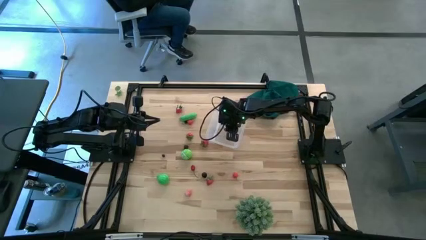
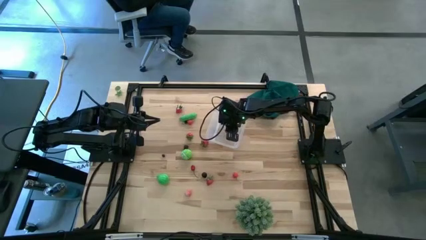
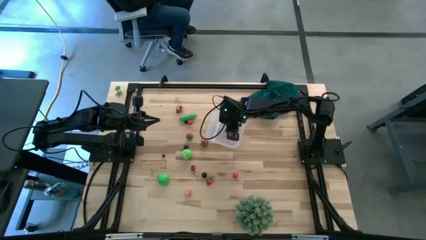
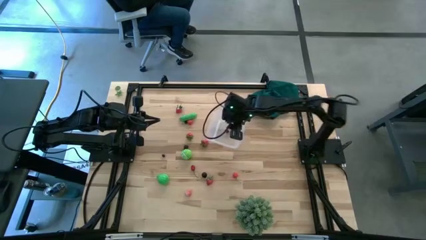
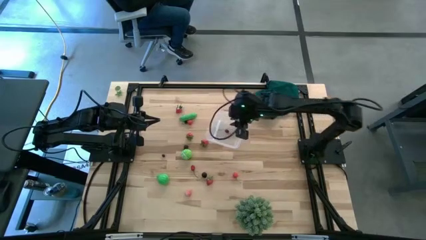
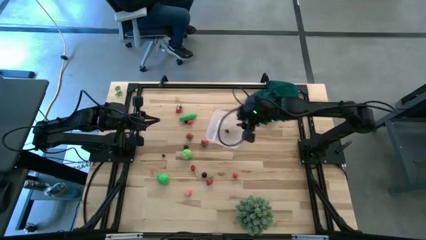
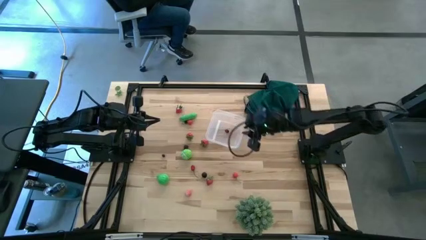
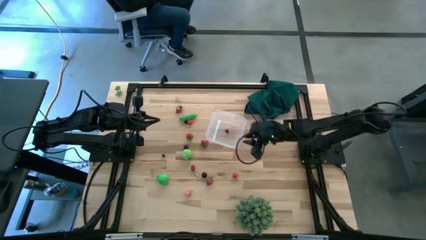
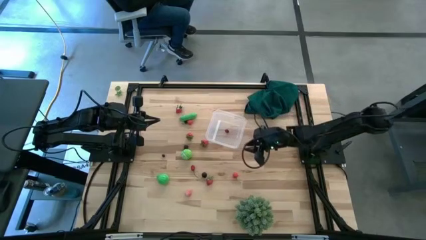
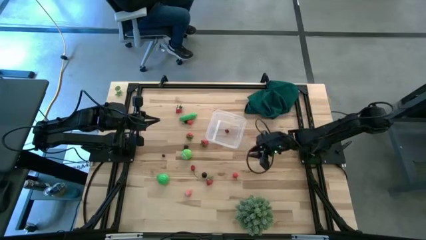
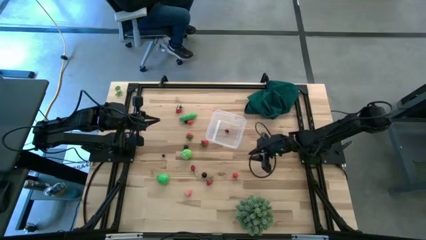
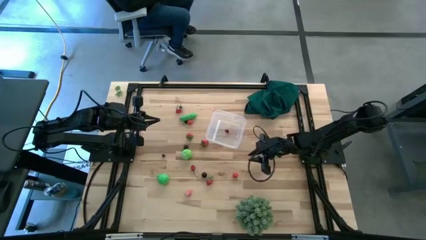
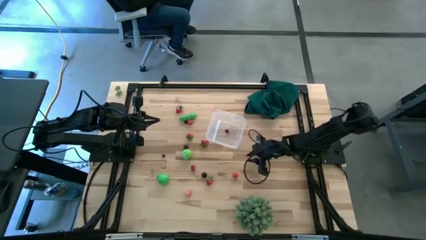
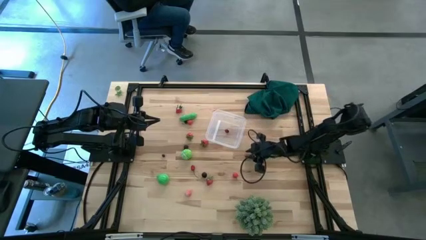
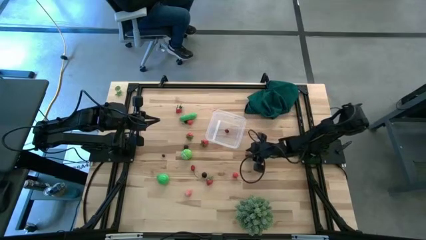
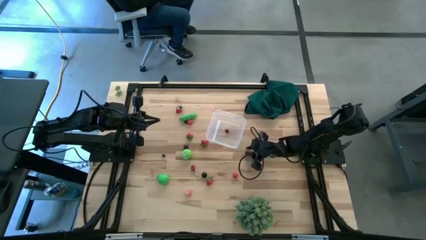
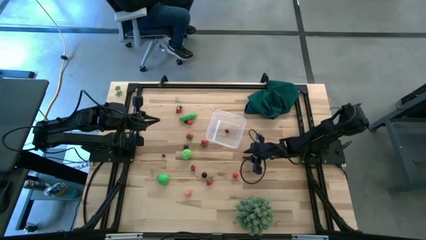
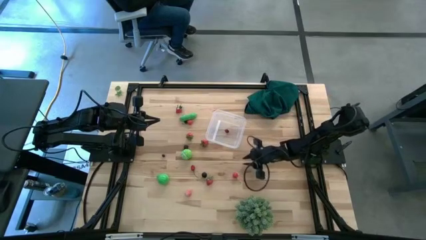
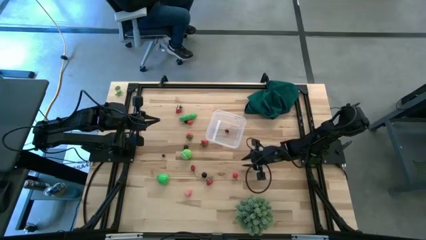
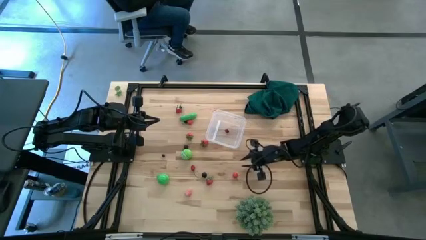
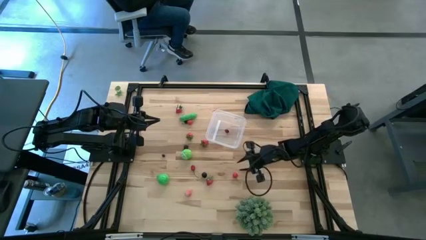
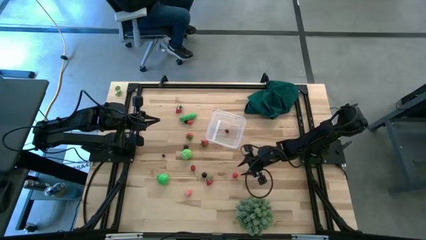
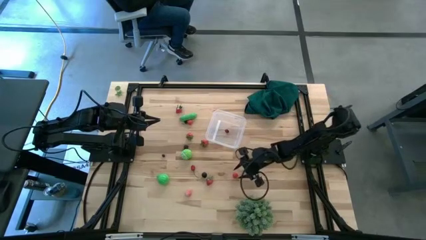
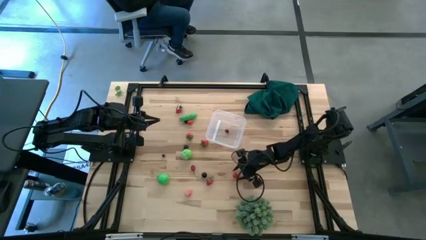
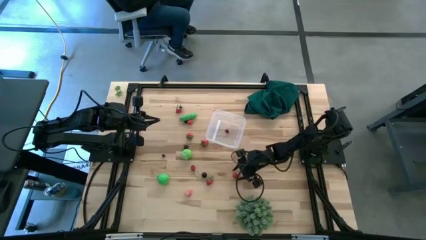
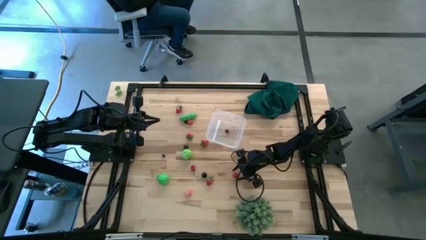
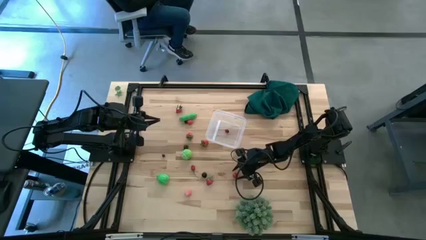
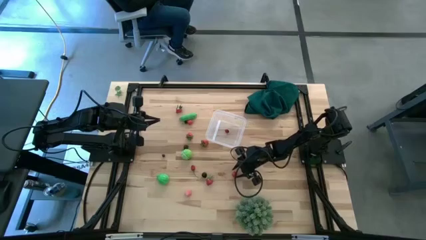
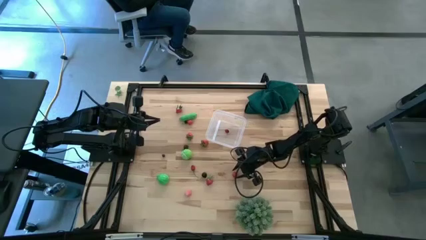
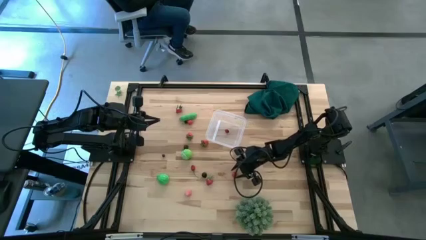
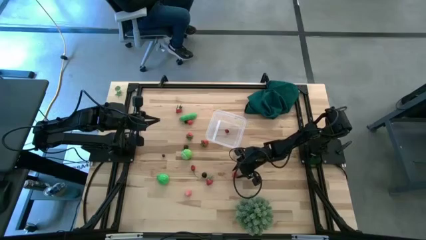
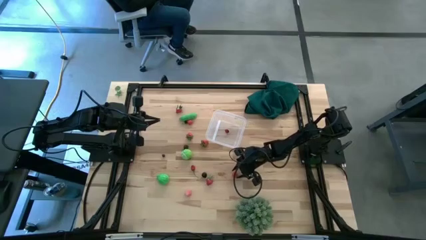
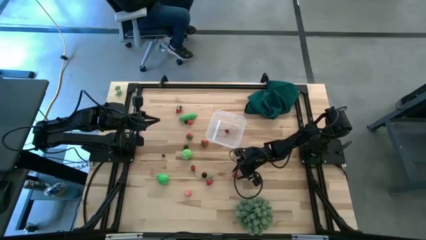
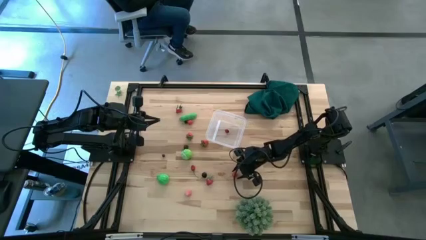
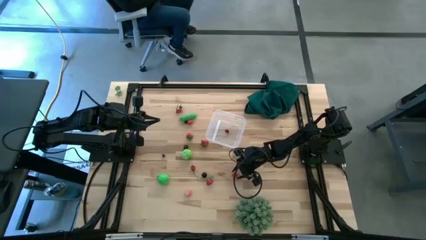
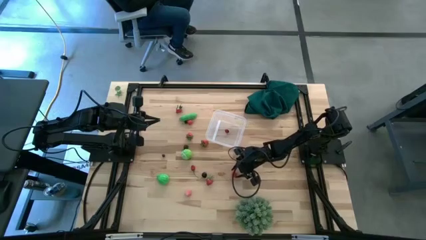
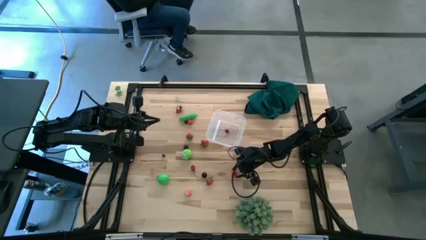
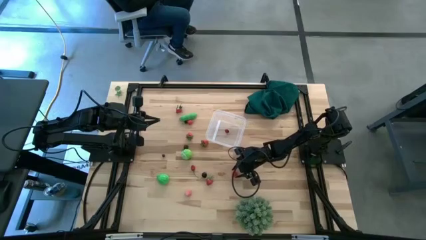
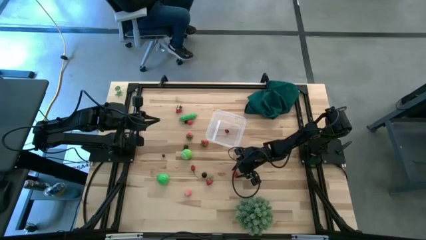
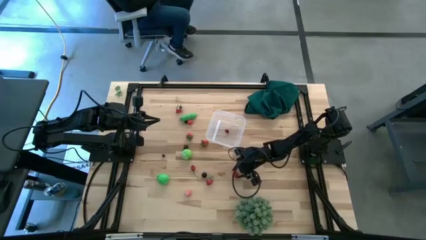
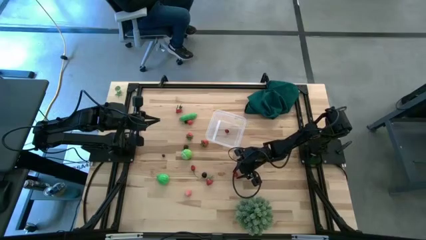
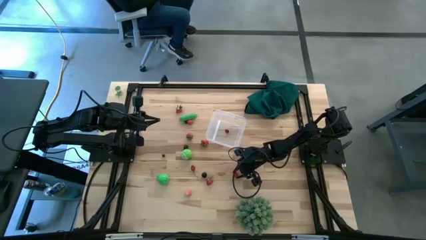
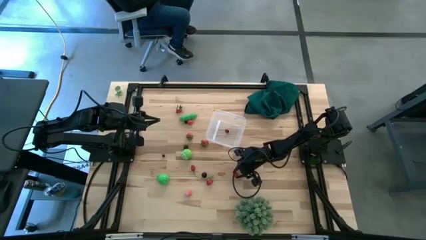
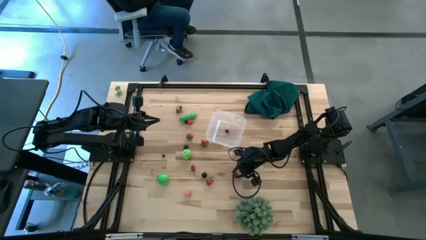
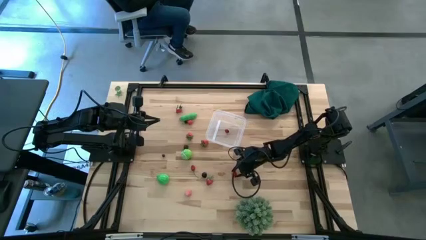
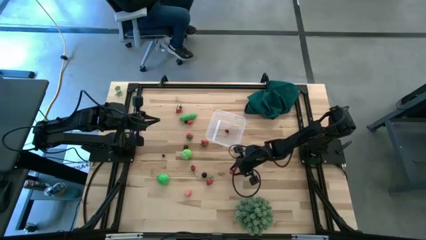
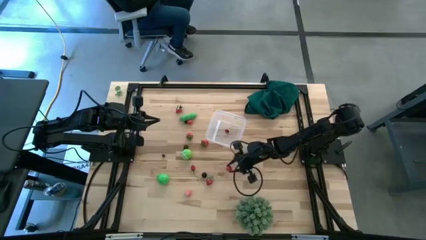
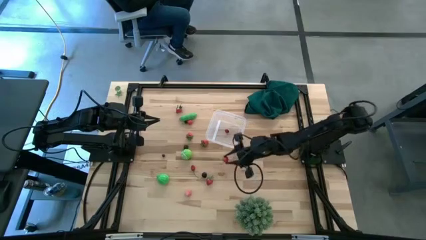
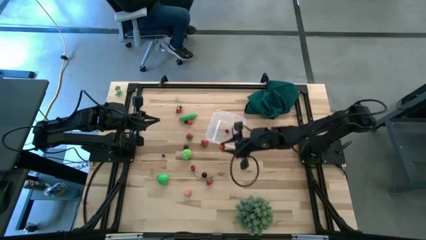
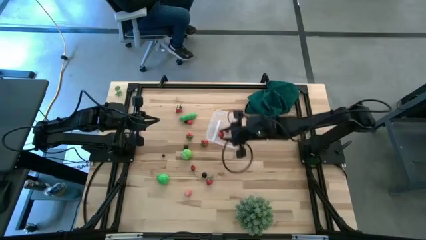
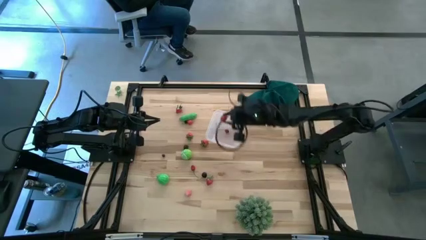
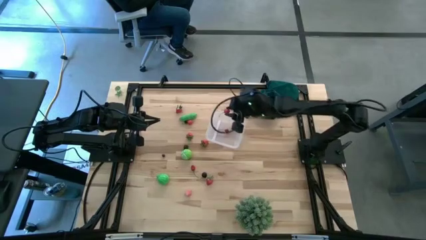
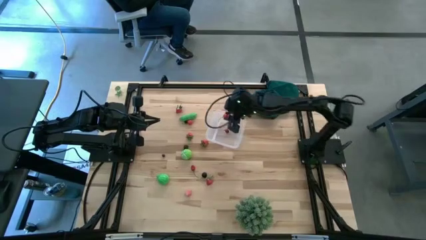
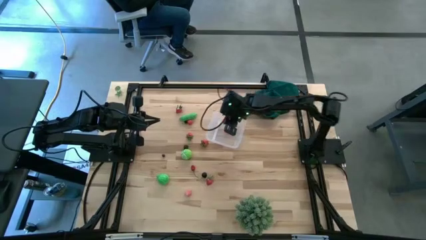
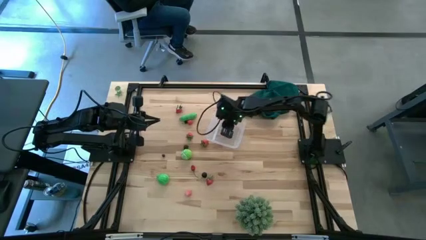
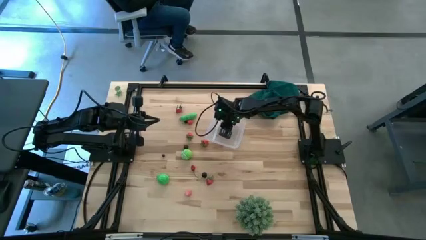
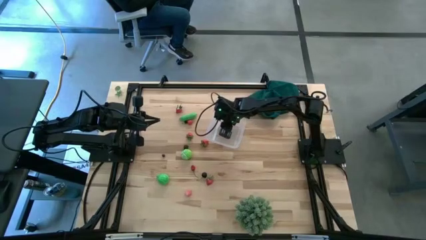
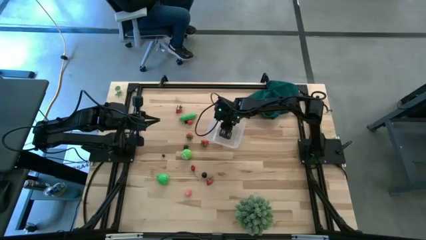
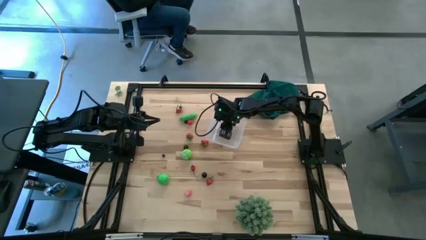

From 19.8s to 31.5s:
Task: Pick and placing Produce into tupperware
Put the red cherry into the transparent bin

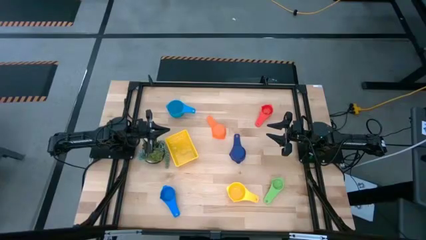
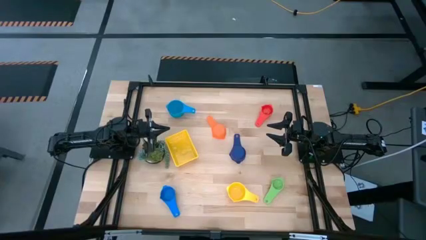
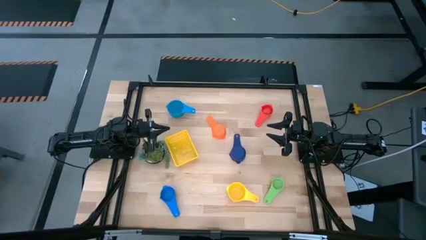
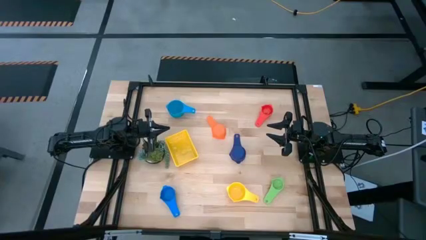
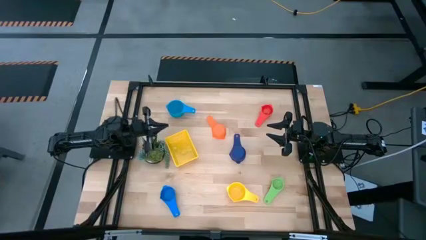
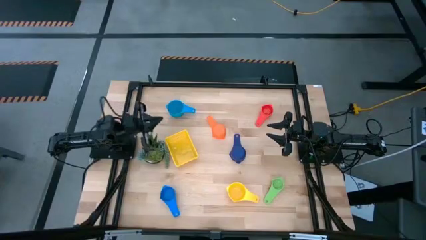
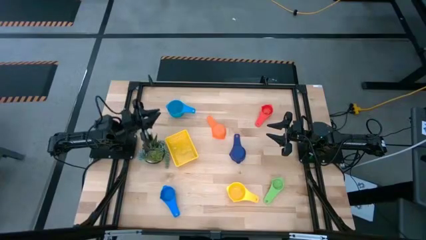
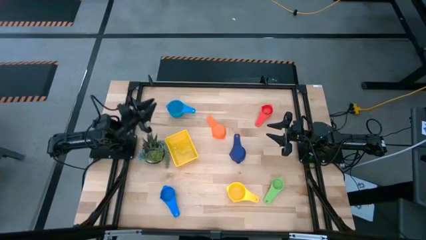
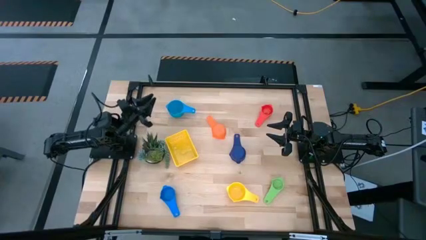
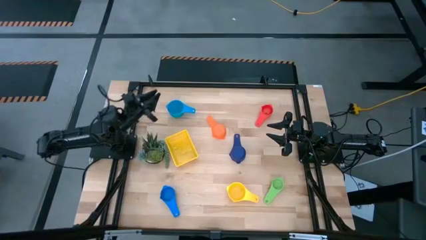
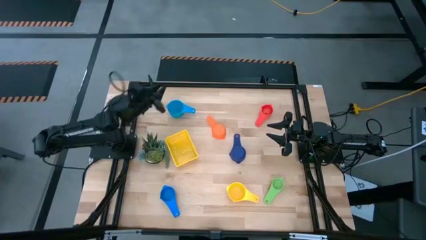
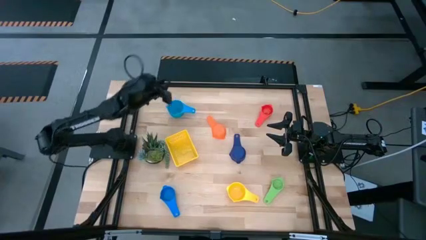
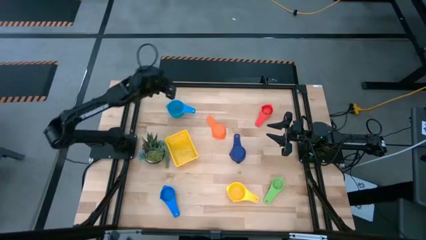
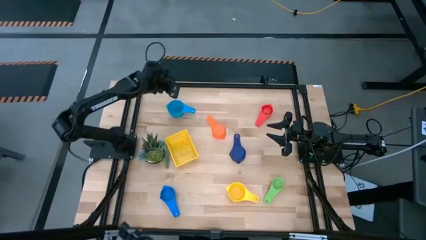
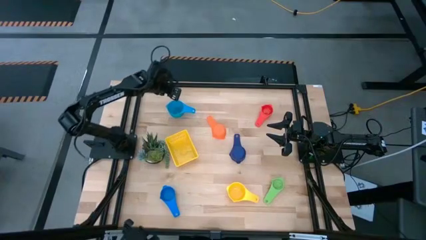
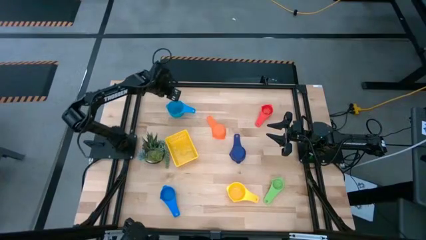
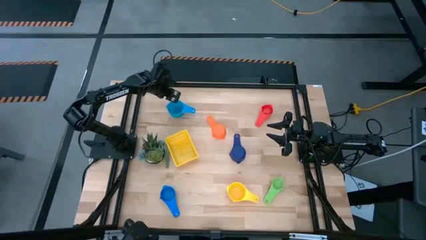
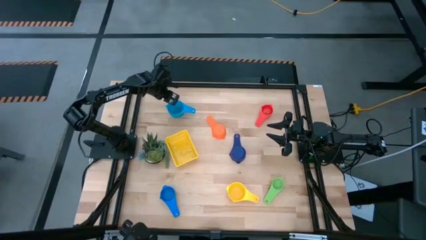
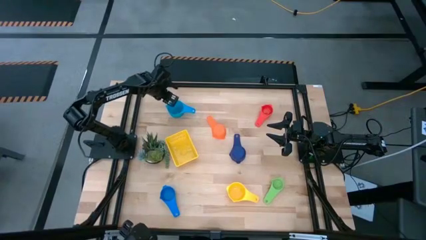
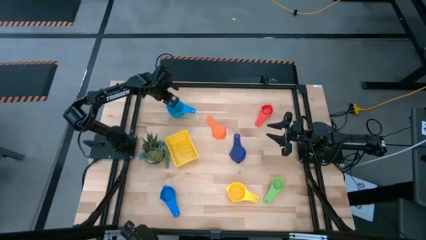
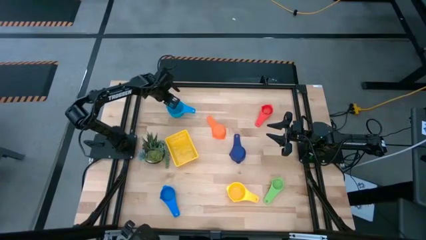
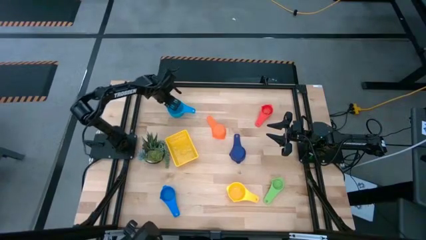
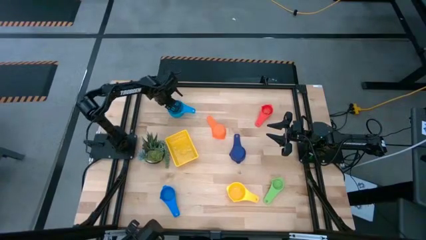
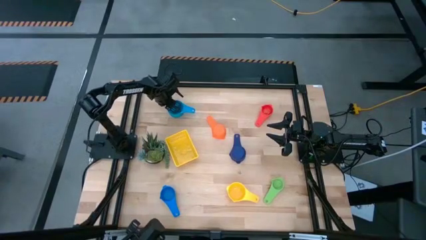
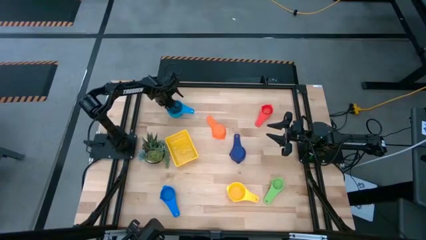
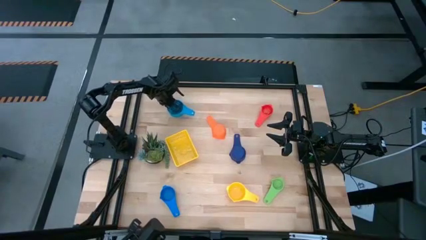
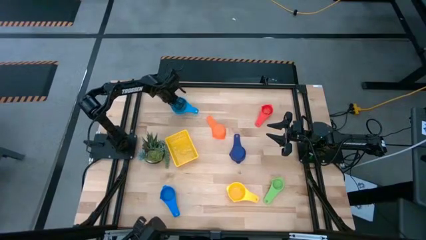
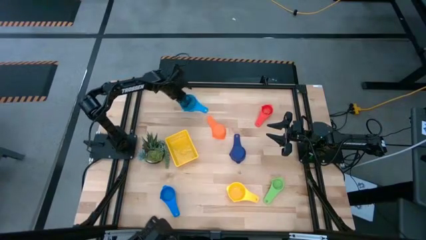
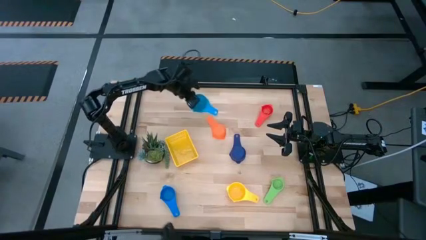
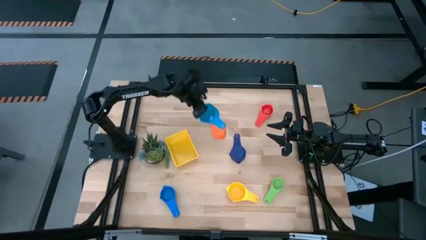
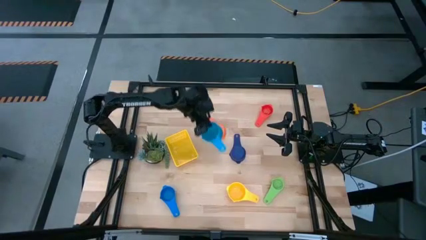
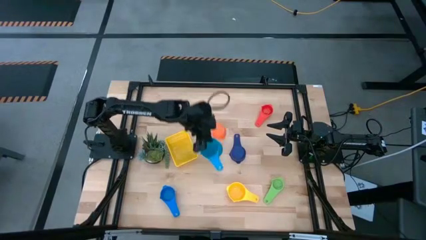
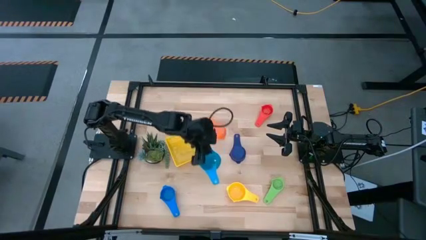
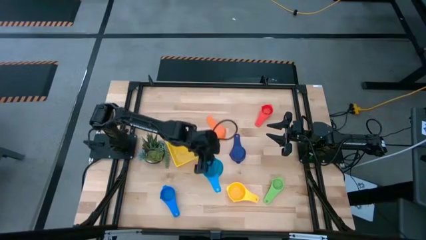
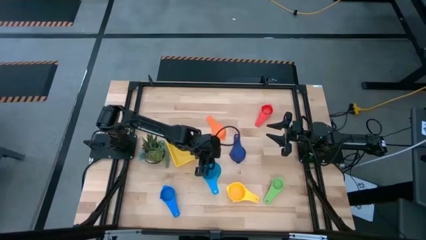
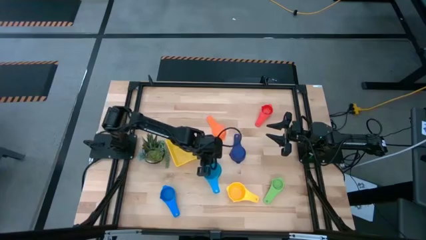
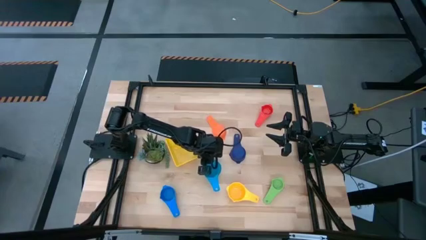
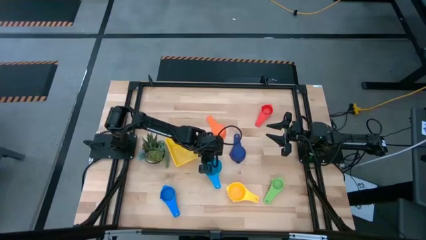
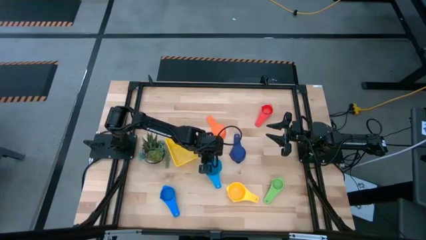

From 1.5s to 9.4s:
Task: Nest measuring cups in basket
Move the light blue measuring cup to the center of the table
